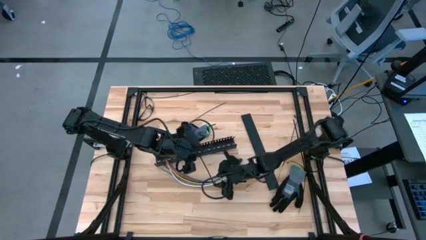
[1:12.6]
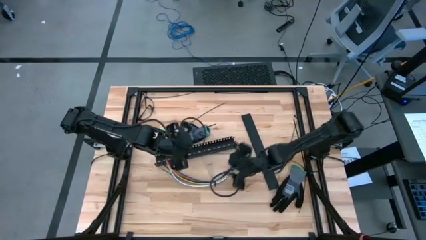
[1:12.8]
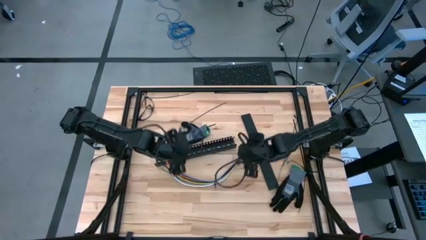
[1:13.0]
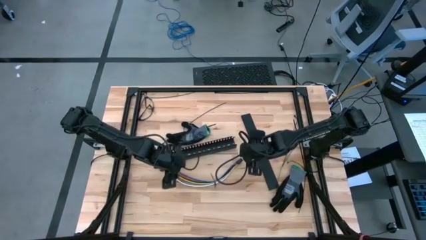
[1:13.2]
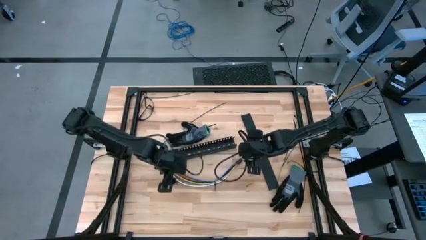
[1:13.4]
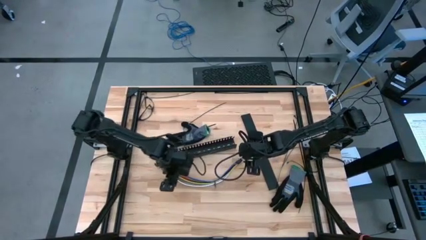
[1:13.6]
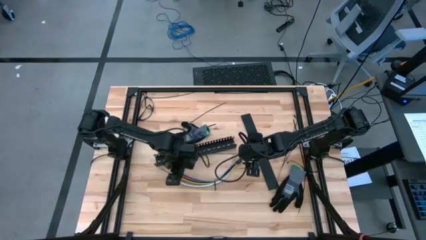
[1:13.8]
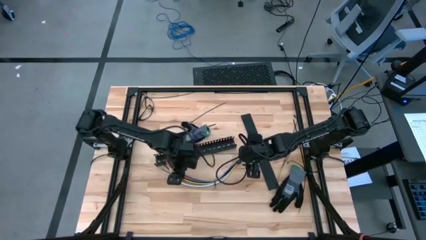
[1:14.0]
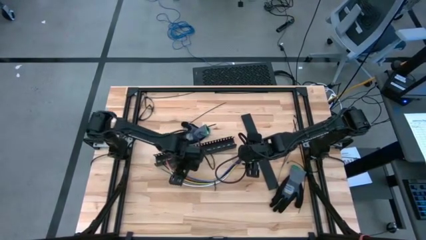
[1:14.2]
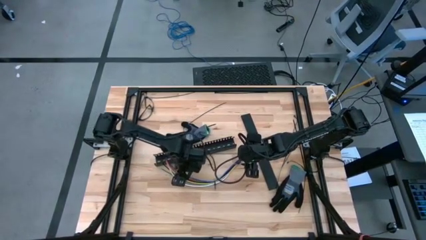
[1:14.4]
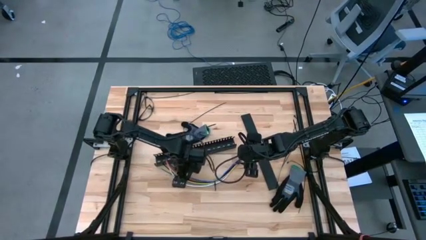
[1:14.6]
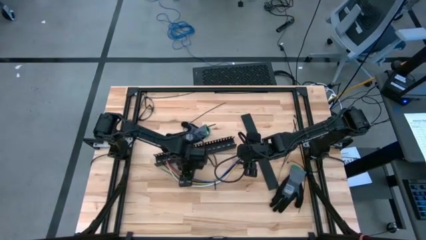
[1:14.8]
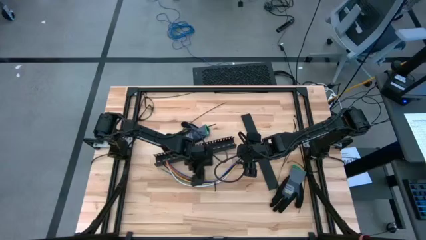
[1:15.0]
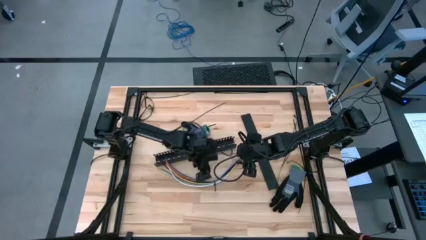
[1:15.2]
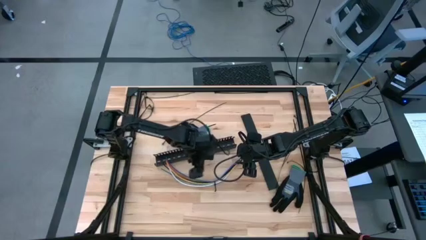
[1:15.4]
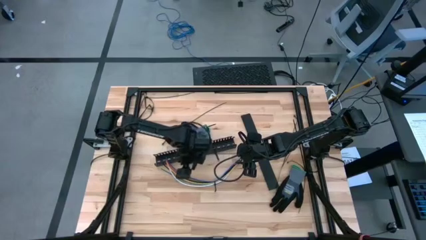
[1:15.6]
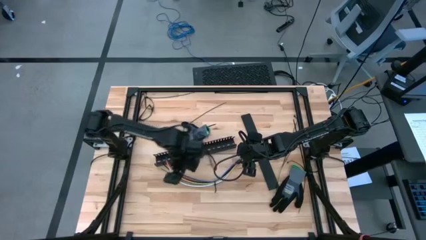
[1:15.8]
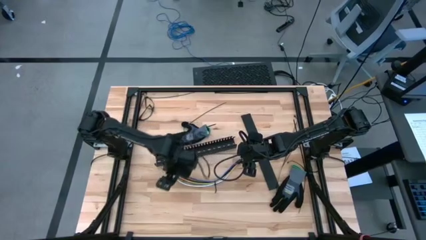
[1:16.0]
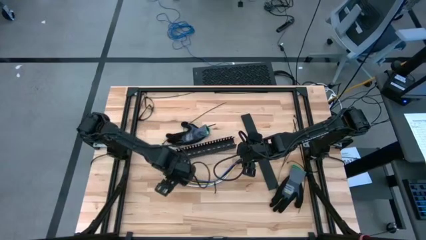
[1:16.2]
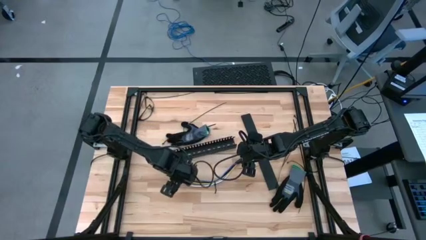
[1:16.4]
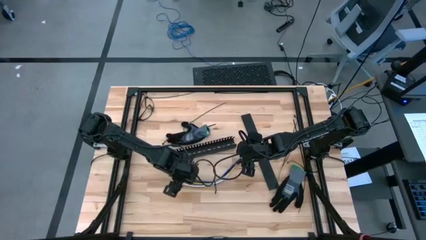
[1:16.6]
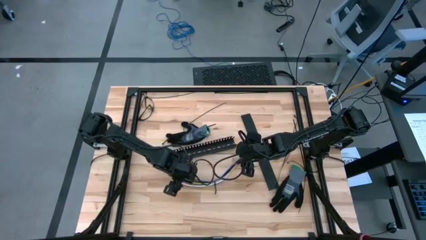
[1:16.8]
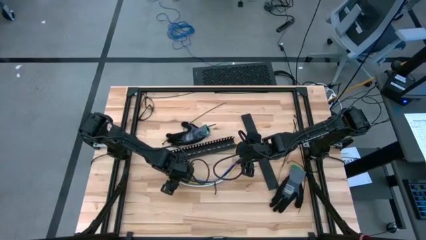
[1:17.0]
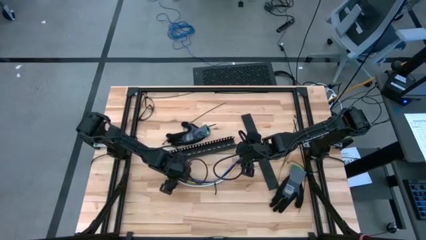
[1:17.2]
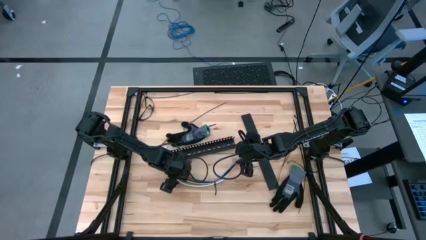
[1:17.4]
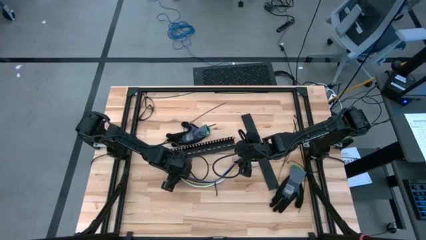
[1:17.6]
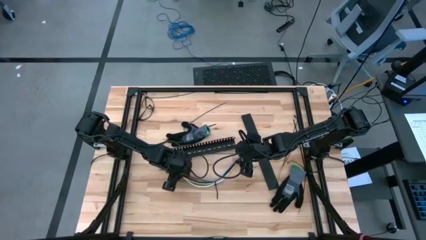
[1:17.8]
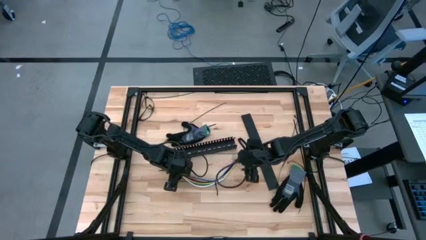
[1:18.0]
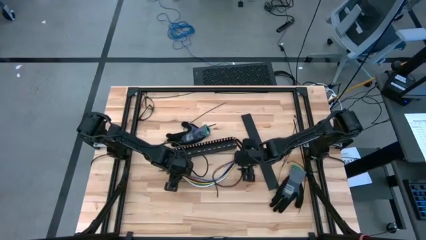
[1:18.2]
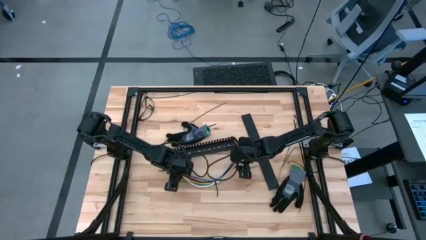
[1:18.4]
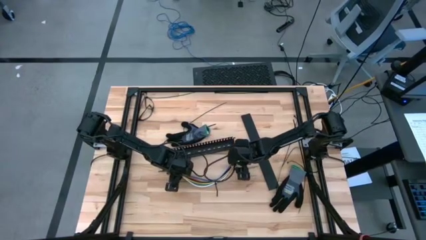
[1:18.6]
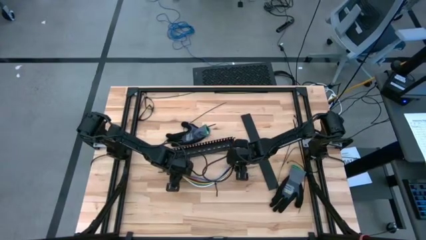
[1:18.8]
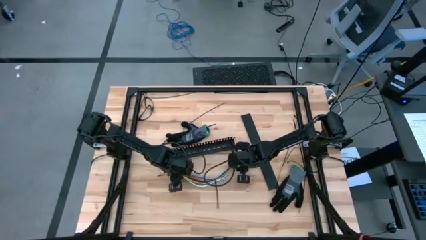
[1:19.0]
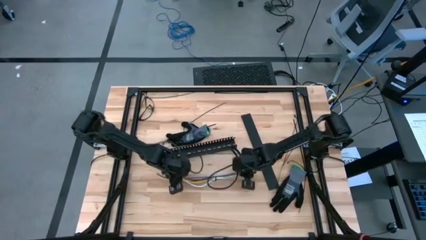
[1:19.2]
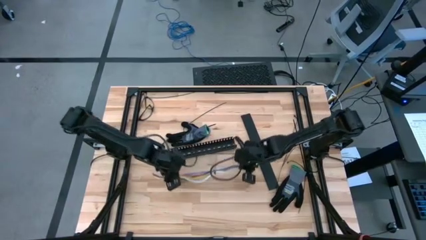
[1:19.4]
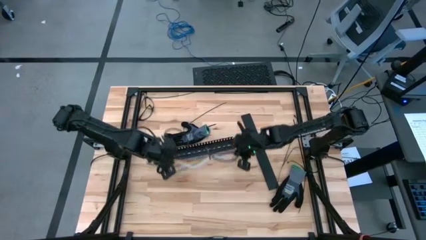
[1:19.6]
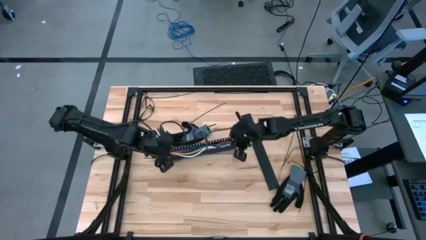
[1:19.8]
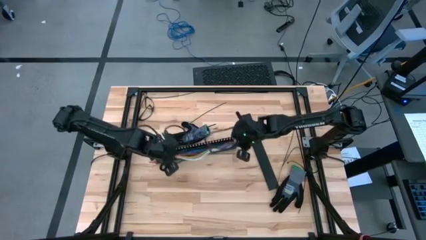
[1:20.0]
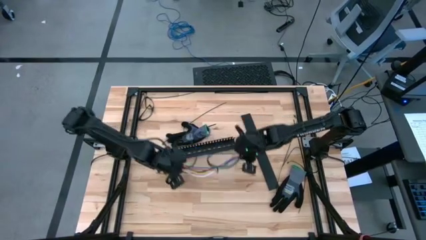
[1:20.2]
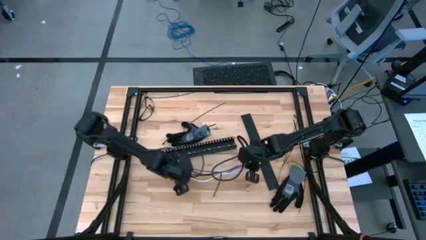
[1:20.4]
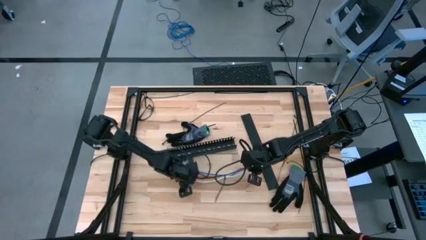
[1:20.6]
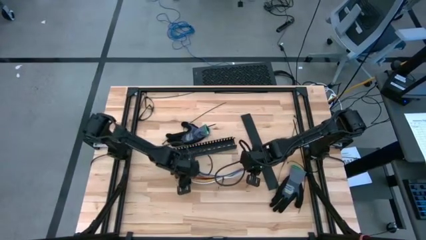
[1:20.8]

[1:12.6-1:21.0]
Task: Ziptie cables
Put the cable wires into the black cable duct
